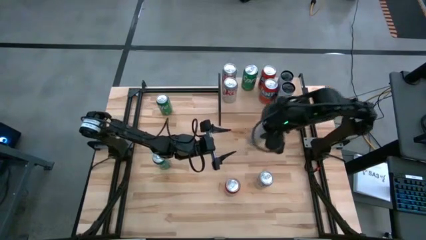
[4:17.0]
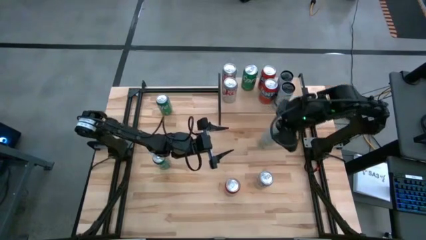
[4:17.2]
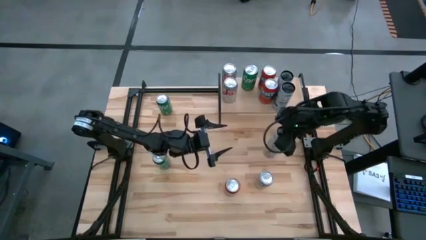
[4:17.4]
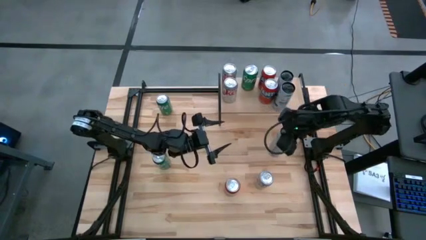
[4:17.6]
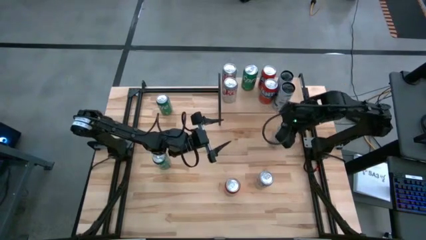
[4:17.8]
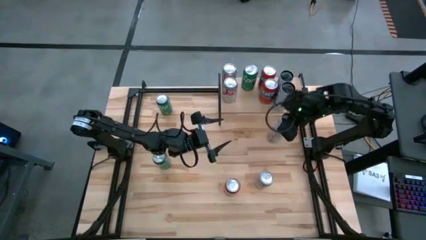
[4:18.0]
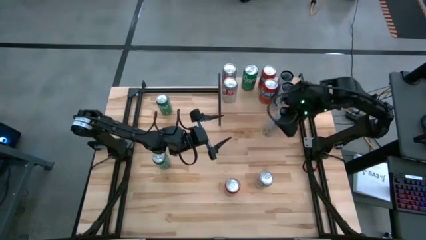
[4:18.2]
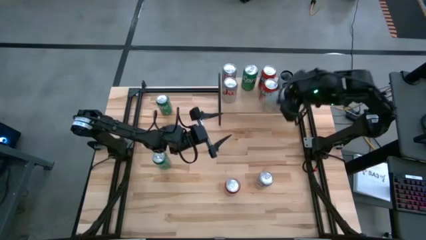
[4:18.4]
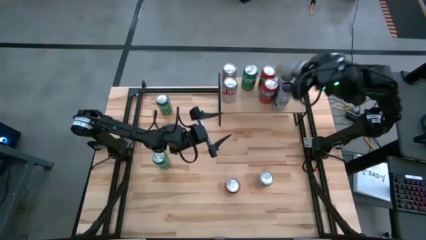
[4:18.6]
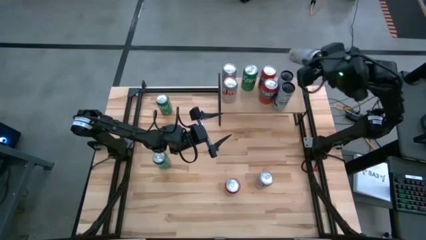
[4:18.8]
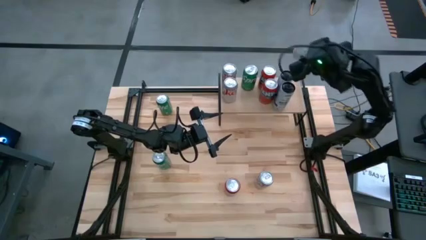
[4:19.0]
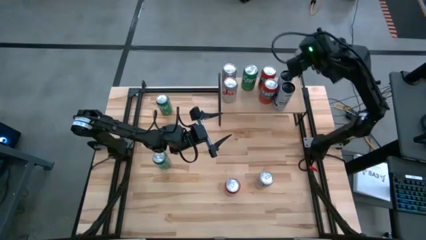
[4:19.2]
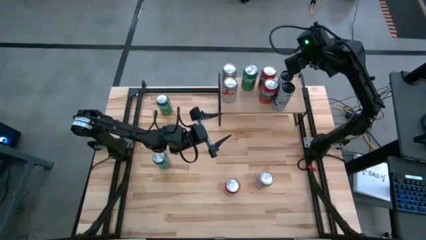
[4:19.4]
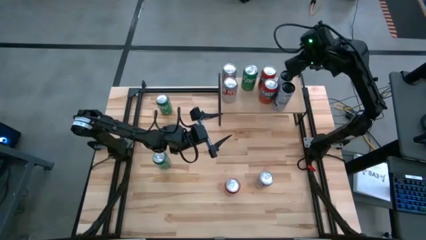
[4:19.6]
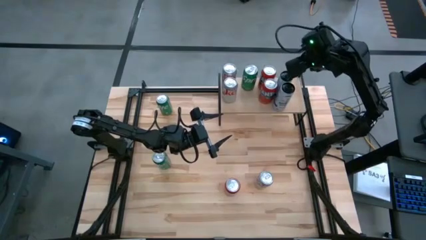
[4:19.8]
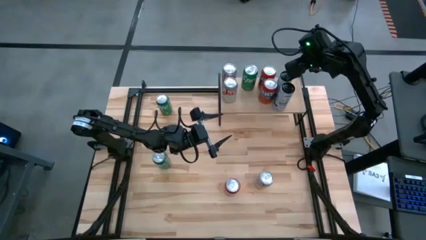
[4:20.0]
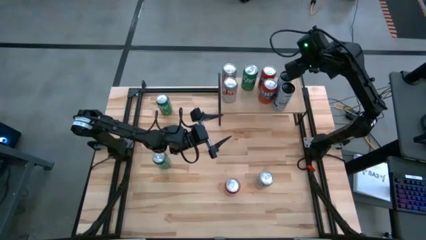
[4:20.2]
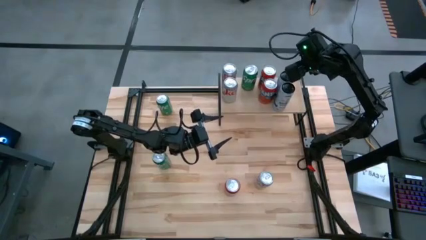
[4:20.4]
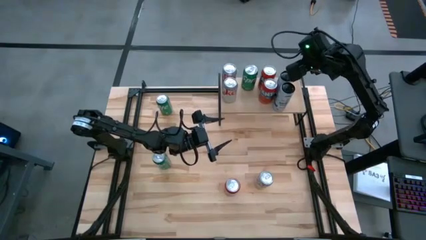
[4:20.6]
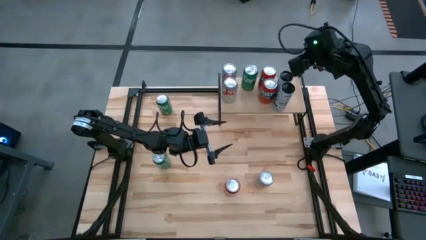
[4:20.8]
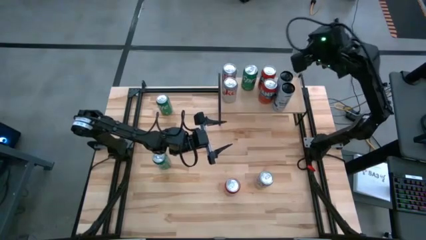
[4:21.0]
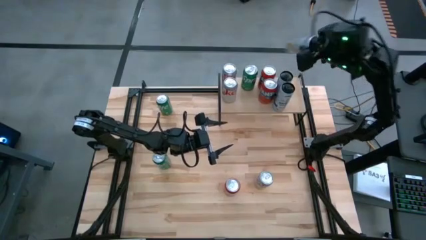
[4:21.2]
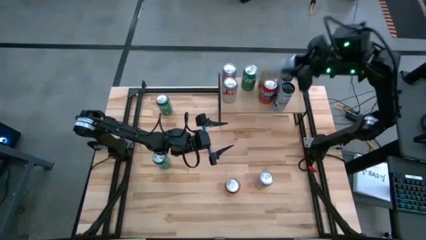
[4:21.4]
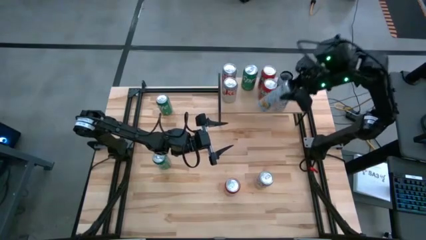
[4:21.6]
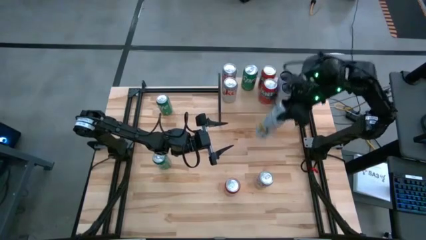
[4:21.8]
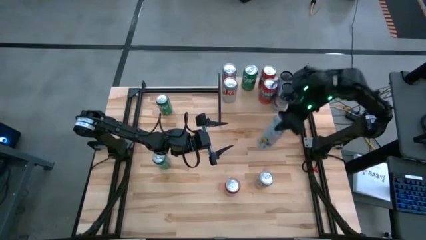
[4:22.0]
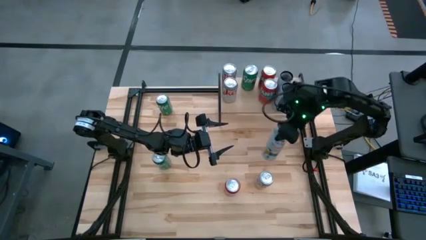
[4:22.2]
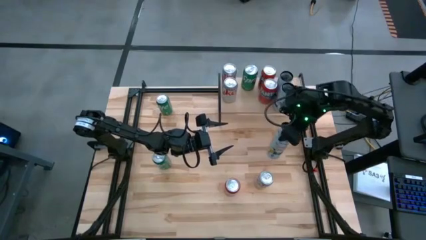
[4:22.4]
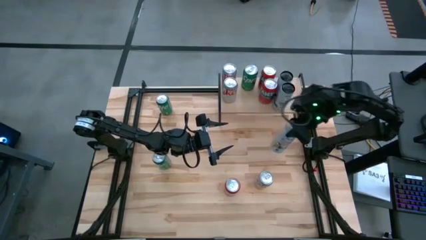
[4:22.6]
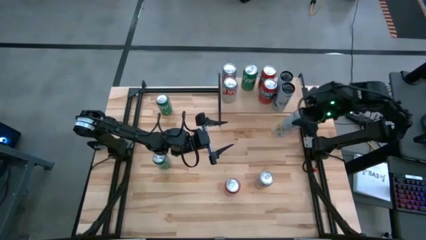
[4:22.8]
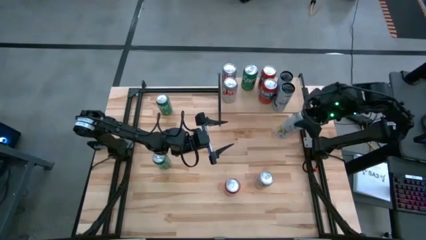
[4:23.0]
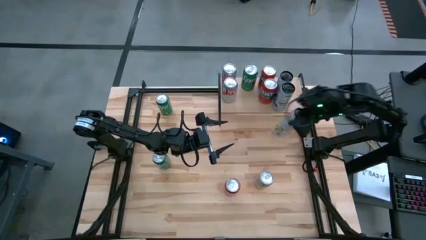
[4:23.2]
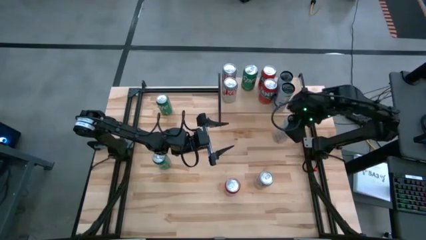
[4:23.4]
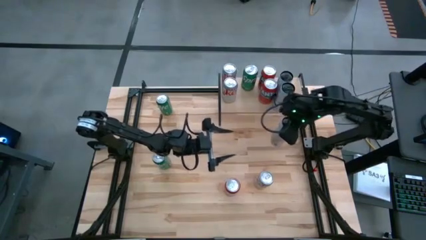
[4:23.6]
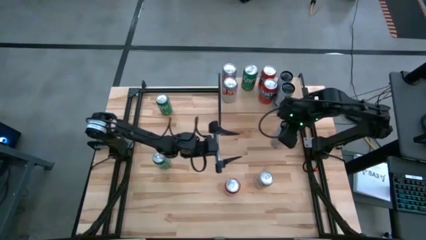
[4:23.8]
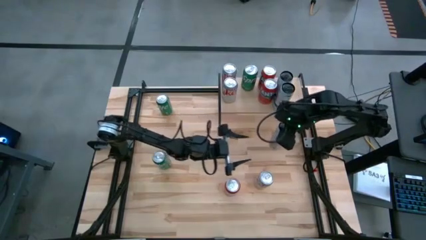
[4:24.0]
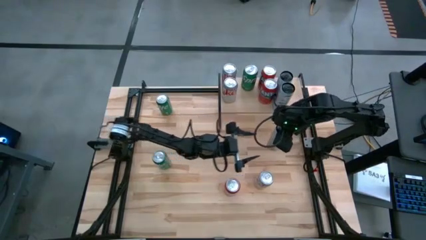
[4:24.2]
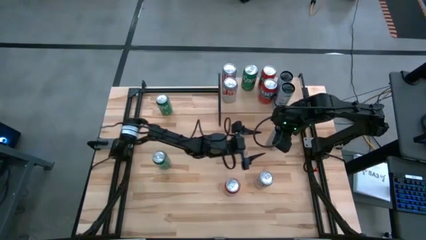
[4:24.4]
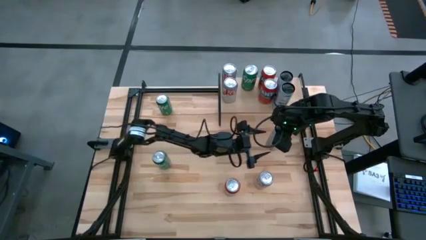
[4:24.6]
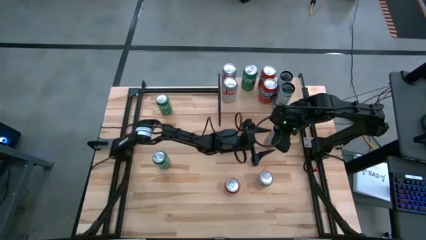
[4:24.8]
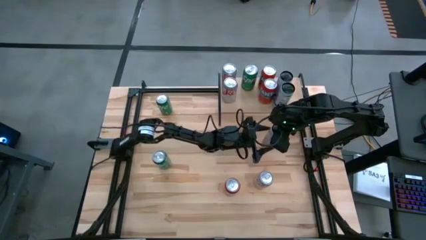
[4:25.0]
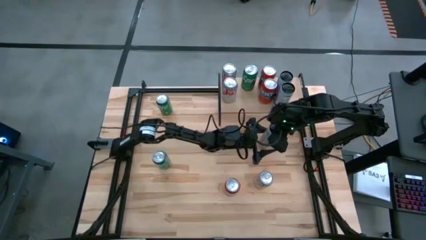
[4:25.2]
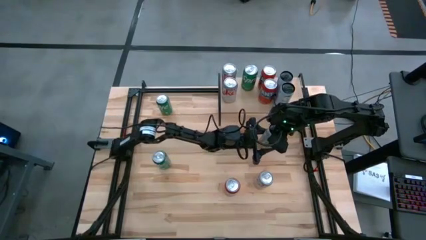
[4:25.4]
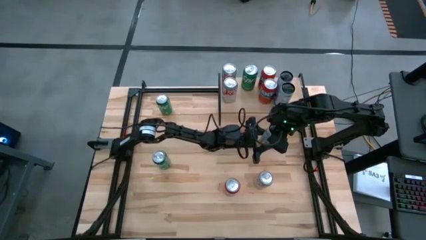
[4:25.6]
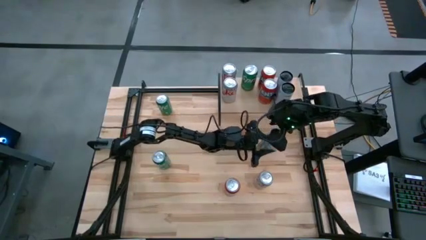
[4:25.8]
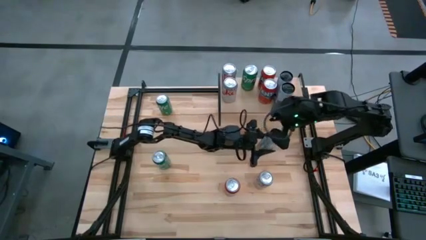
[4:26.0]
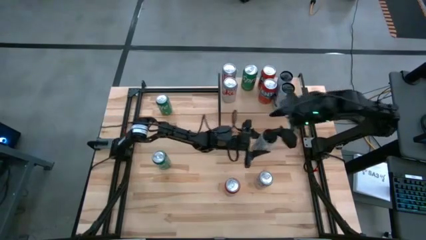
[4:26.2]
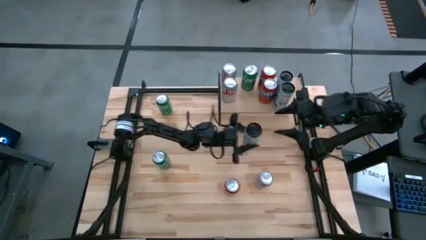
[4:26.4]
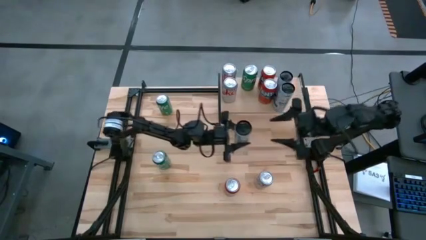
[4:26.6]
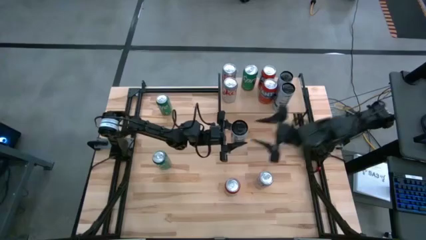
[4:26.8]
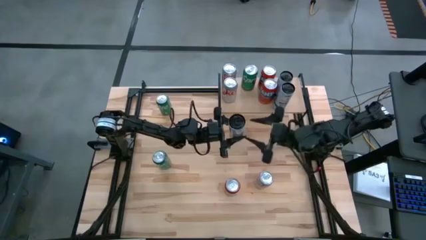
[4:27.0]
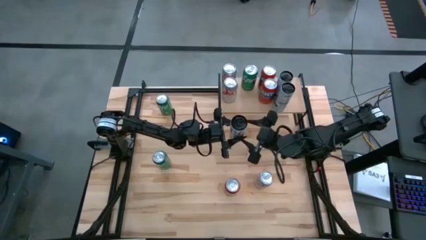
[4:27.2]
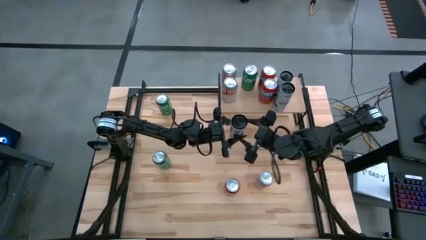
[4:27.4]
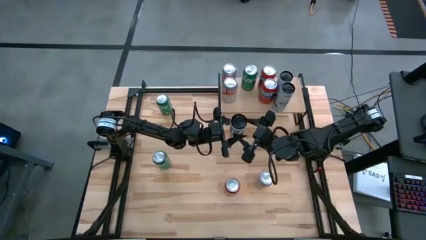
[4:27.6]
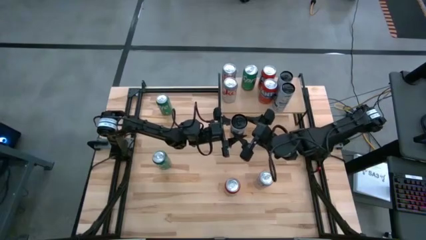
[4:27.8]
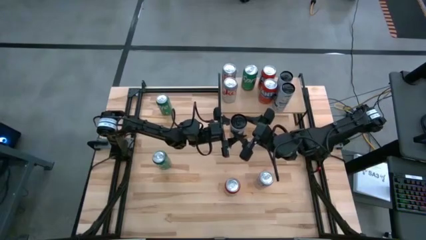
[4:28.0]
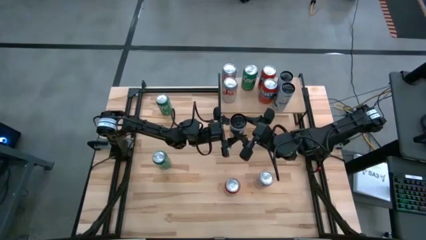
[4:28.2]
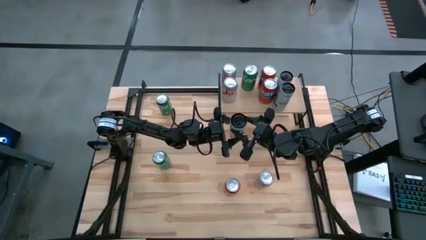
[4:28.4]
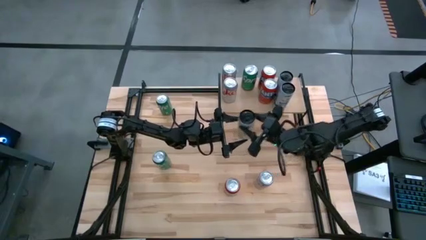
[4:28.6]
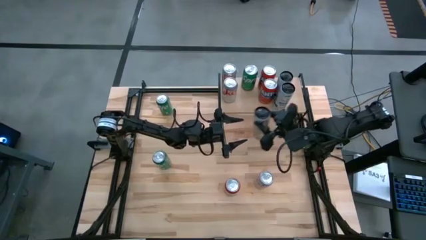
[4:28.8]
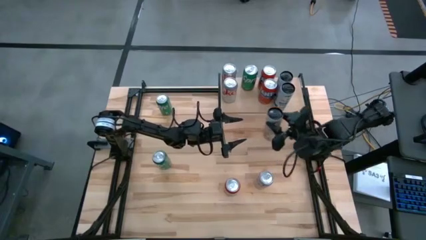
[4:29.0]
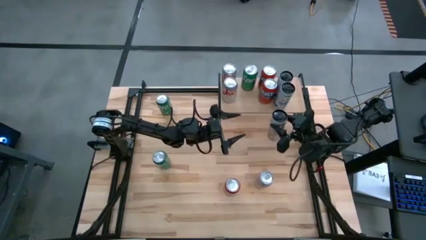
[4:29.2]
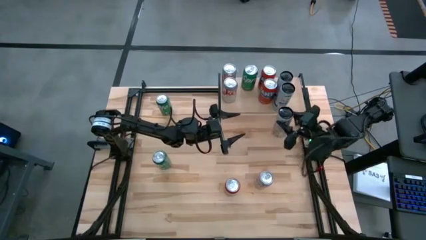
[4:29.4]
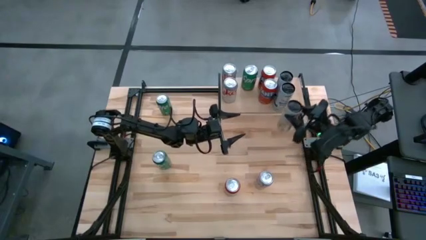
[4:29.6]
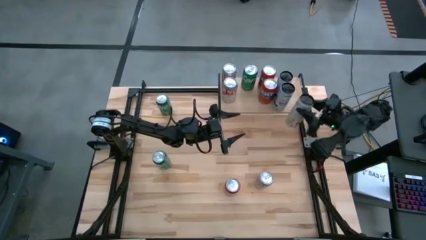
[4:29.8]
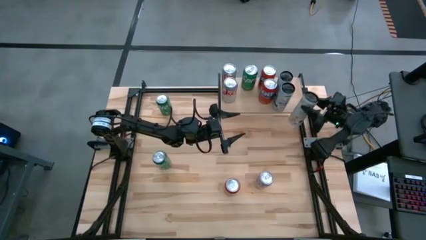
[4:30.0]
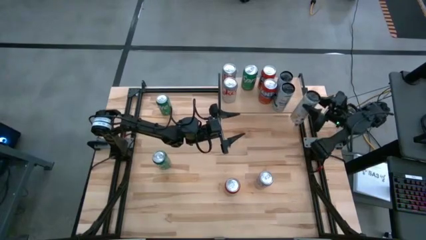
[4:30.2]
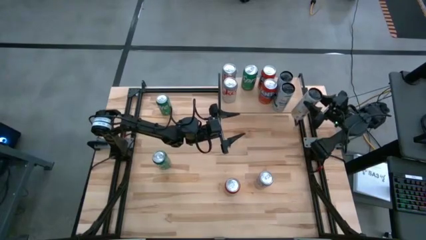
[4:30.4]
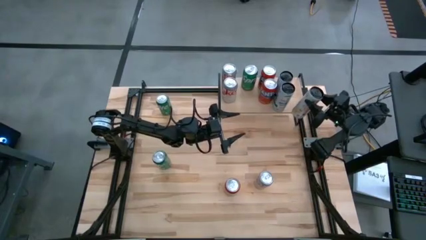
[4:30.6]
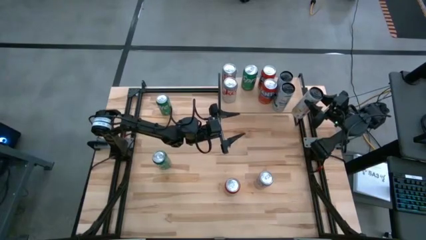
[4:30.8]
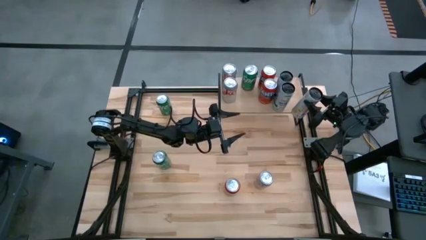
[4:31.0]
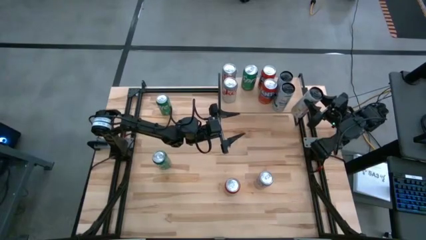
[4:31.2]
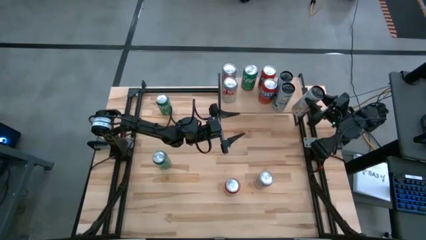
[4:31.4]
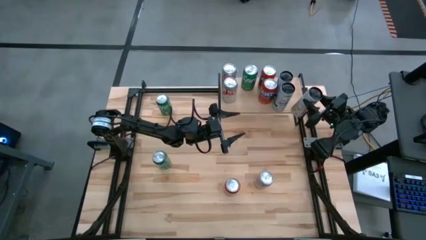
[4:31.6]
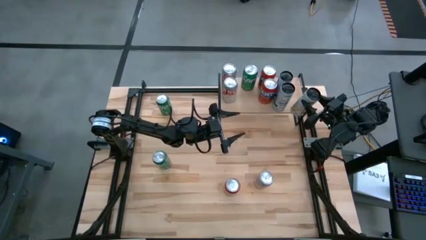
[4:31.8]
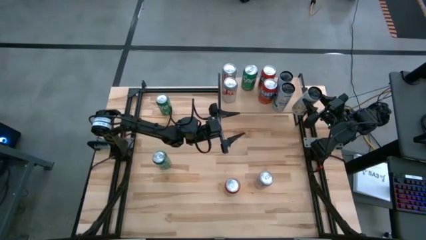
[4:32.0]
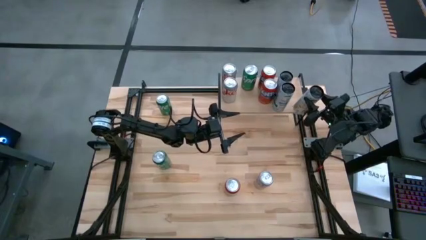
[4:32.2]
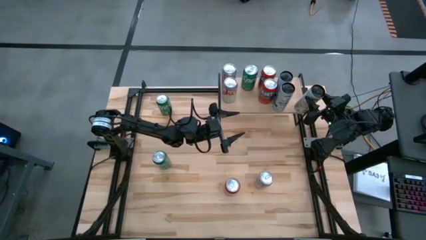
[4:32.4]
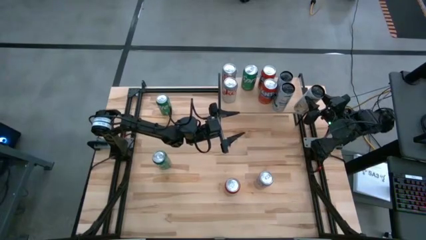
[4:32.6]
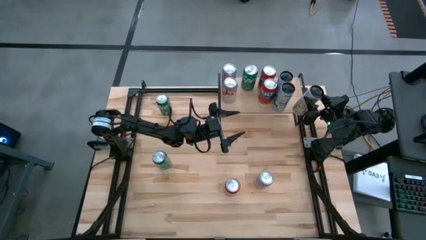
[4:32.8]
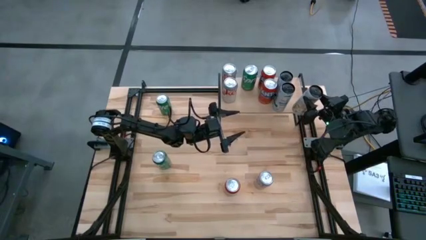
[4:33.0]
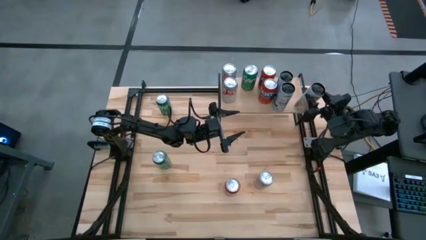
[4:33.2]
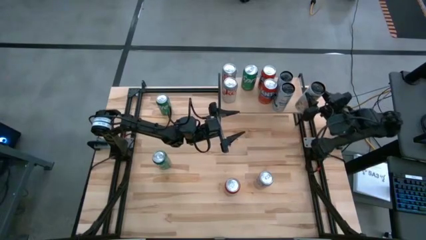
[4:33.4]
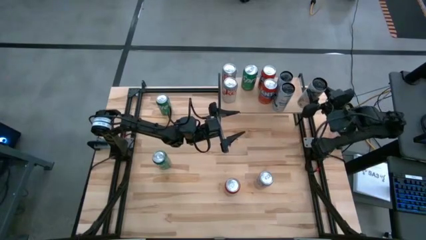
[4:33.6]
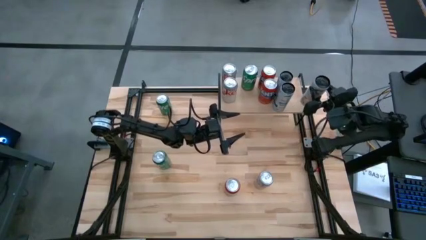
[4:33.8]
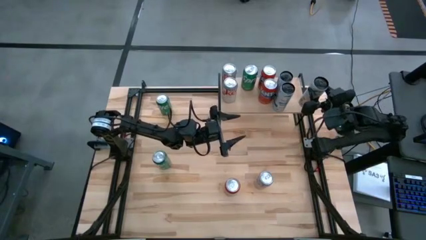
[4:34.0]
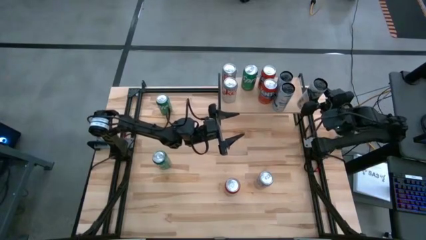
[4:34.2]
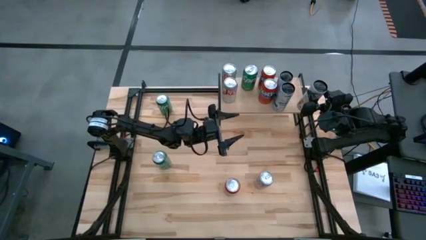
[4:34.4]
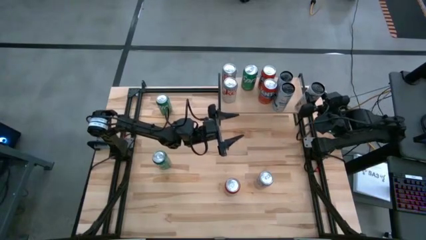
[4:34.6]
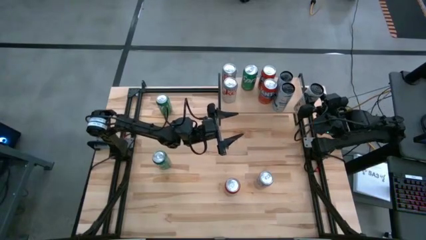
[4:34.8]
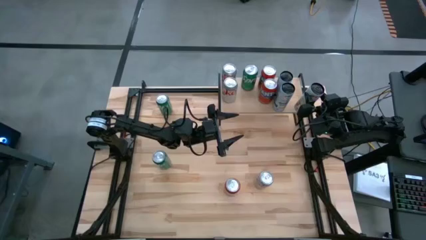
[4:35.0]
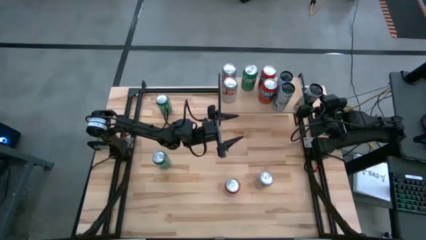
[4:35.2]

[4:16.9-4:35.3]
Task: Place canned beverage on shelf
Put the white soda can on the shelf aligned to the right of the other silver soda cans
